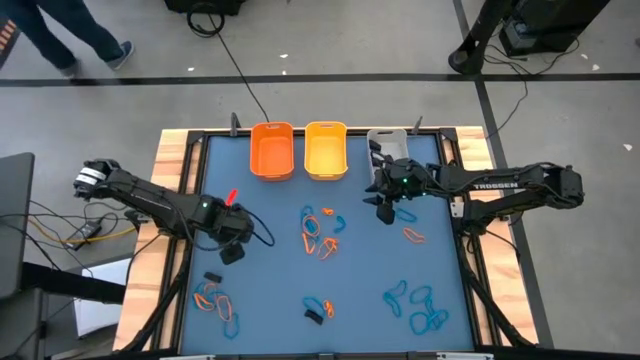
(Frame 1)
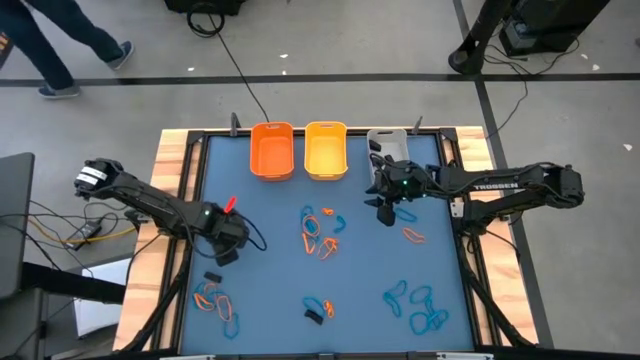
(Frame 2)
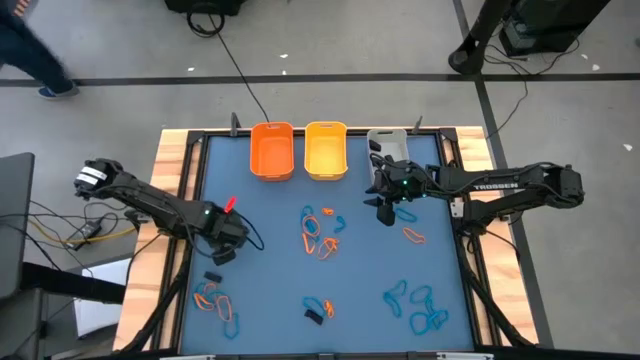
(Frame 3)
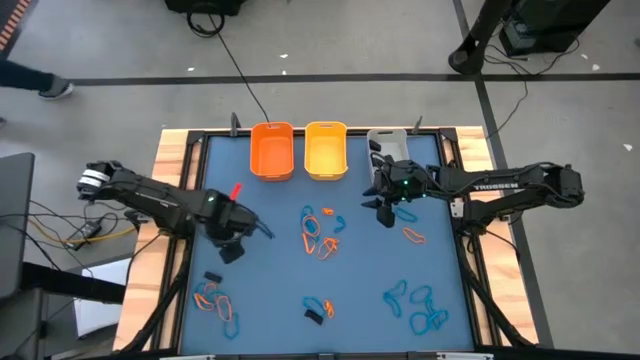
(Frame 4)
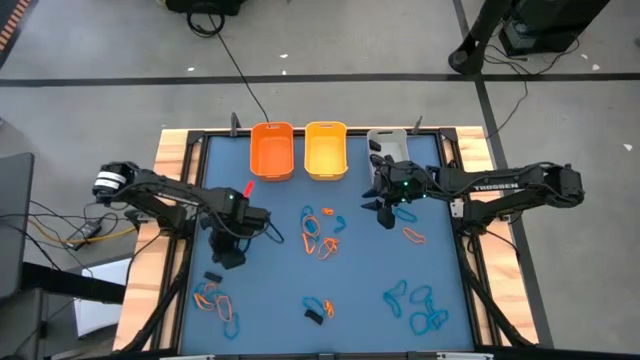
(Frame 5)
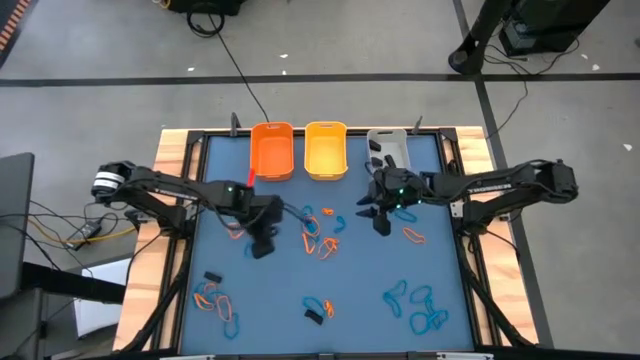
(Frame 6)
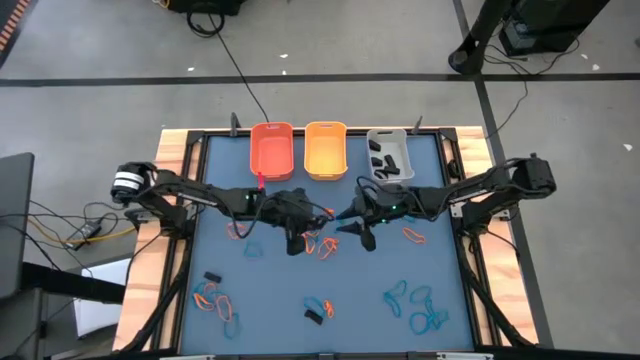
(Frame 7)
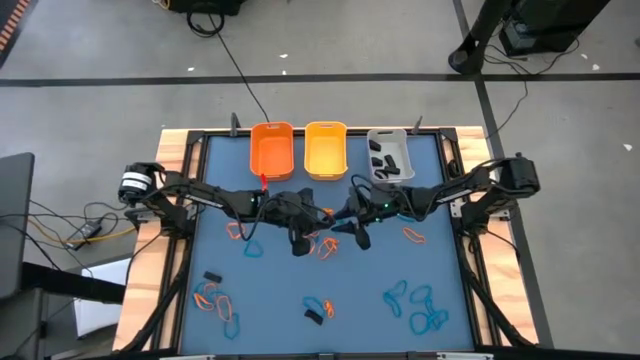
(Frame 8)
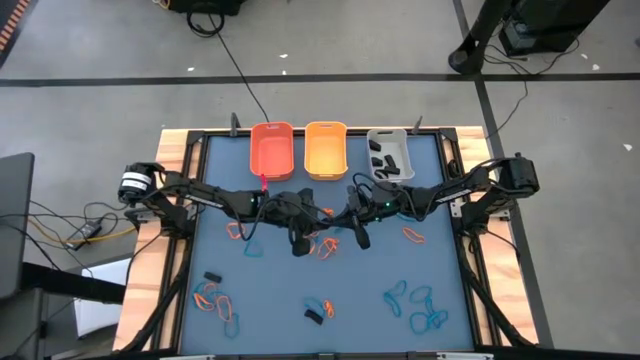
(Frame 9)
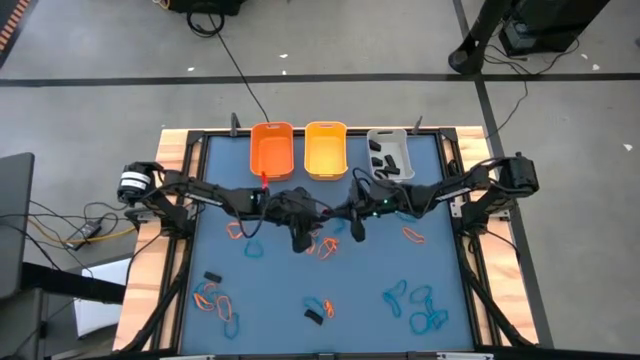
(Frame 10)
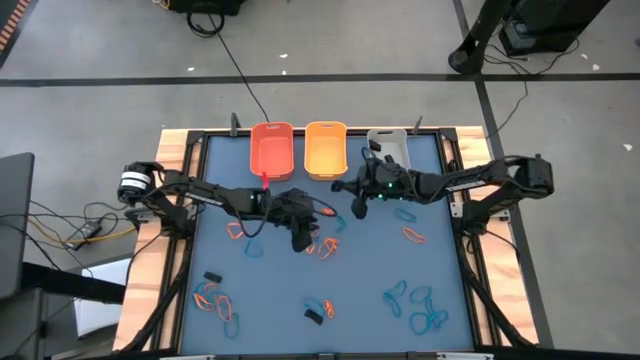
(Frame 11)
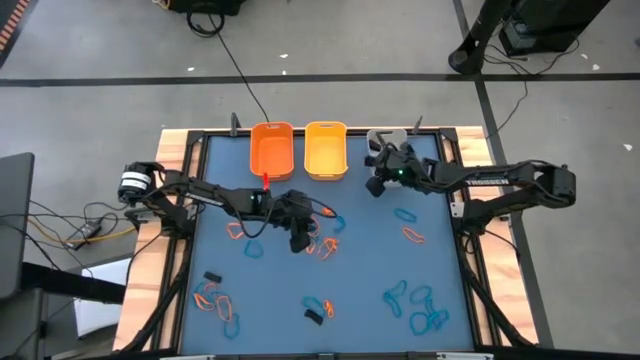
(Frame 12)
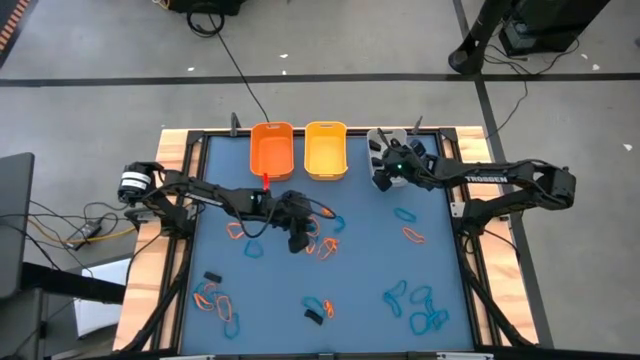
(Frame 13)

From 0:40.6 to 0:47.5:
Task: Sort rubber bands into baskets
Put the black rubber band into the gray bin

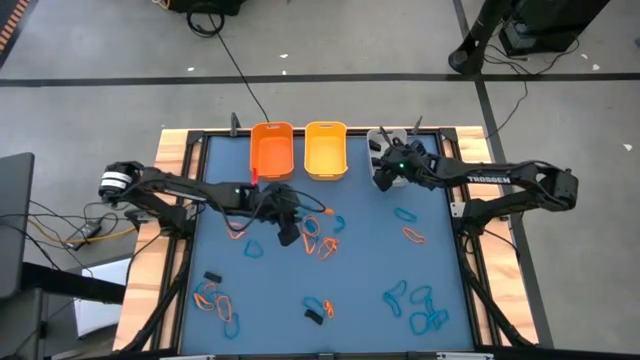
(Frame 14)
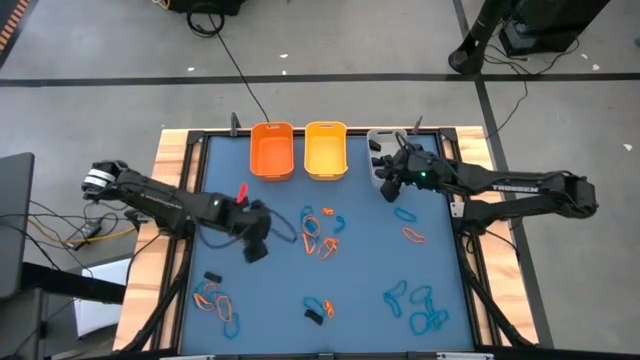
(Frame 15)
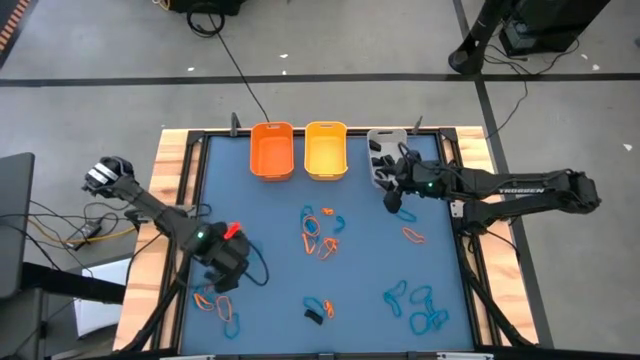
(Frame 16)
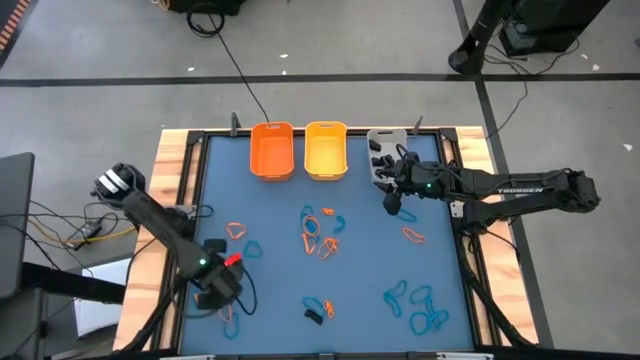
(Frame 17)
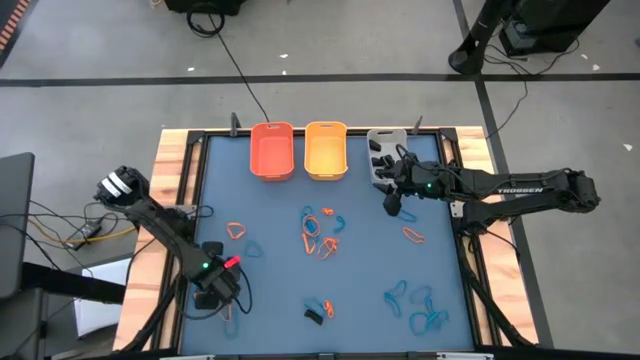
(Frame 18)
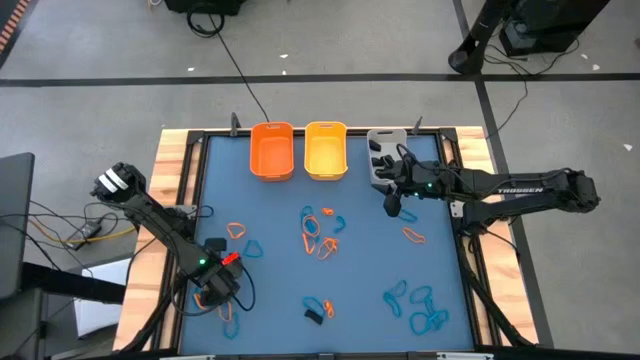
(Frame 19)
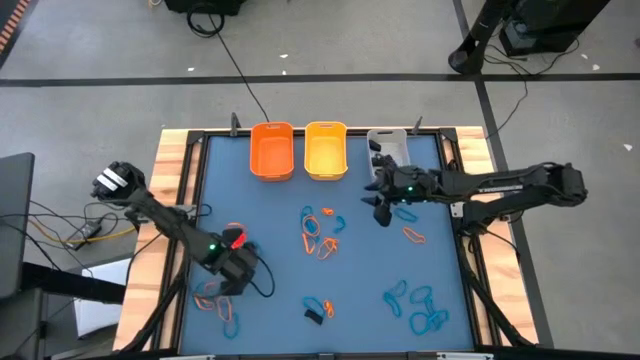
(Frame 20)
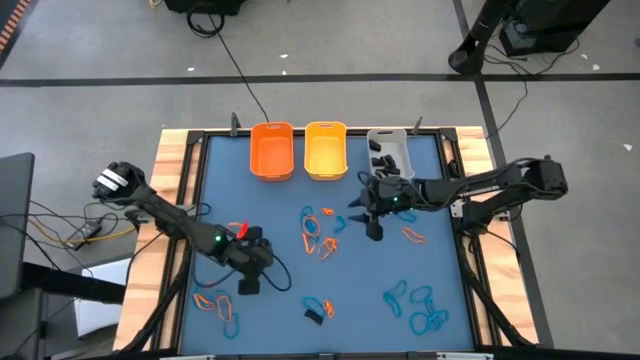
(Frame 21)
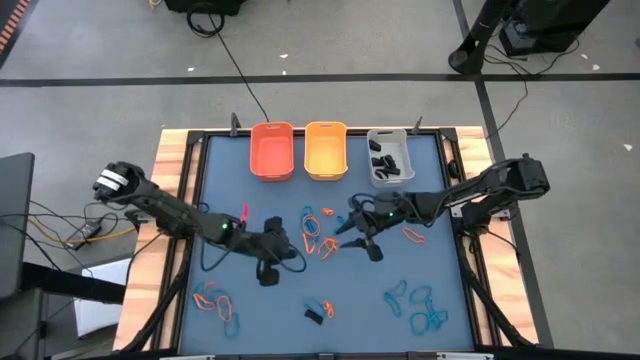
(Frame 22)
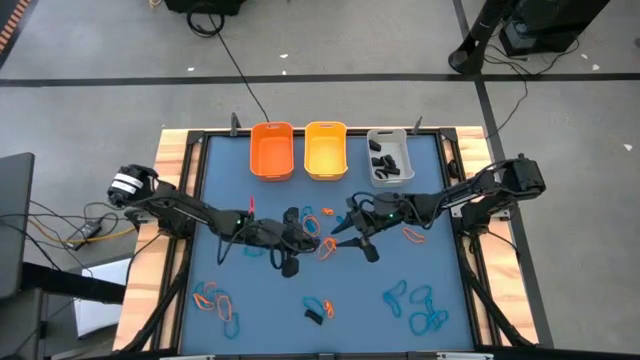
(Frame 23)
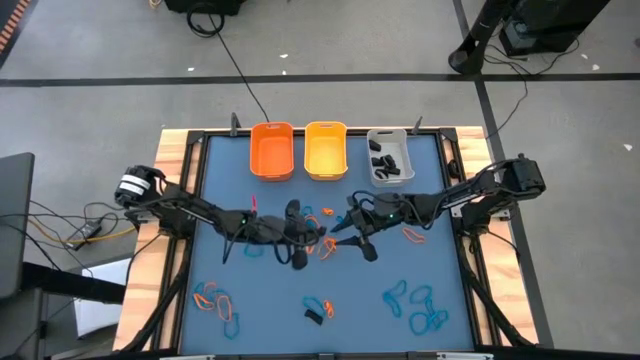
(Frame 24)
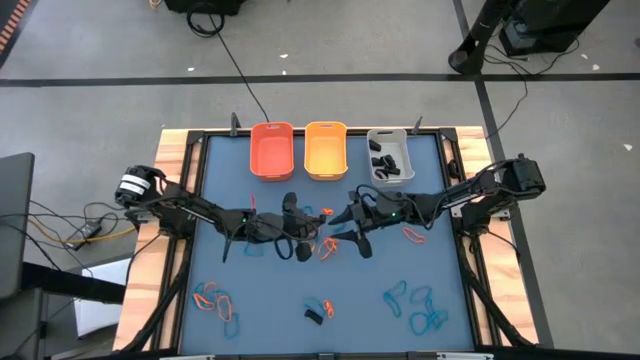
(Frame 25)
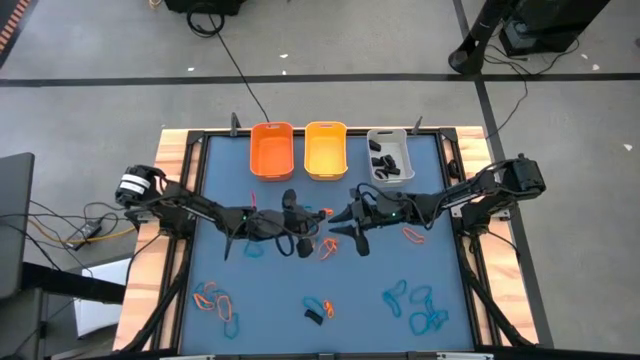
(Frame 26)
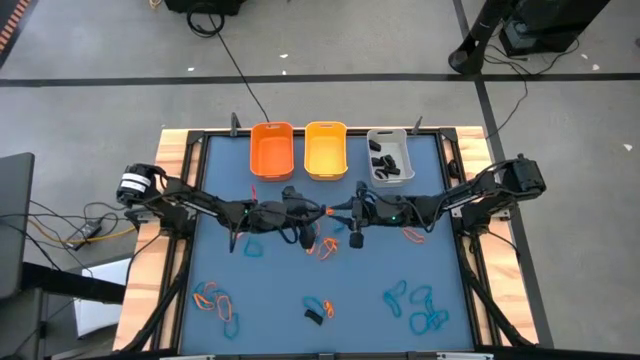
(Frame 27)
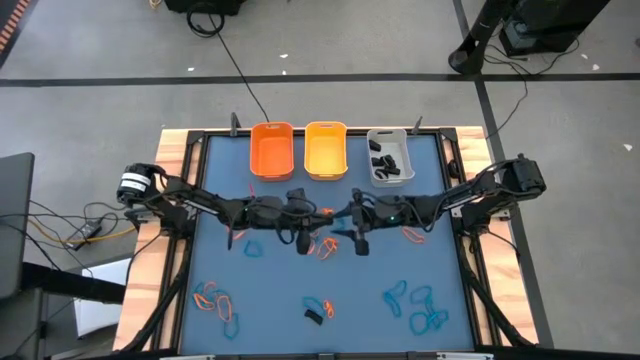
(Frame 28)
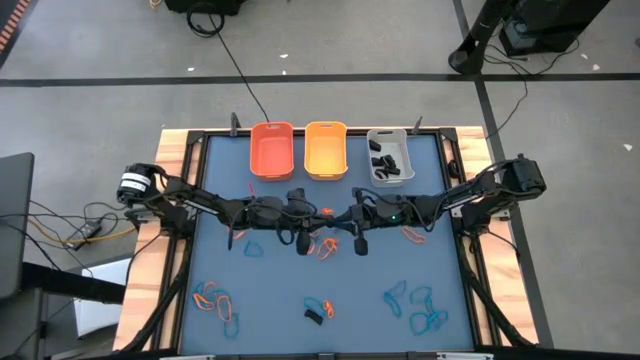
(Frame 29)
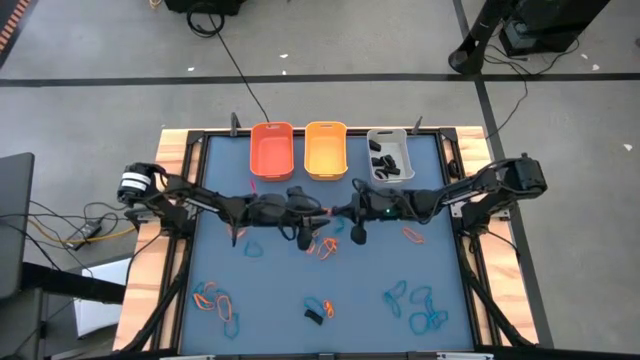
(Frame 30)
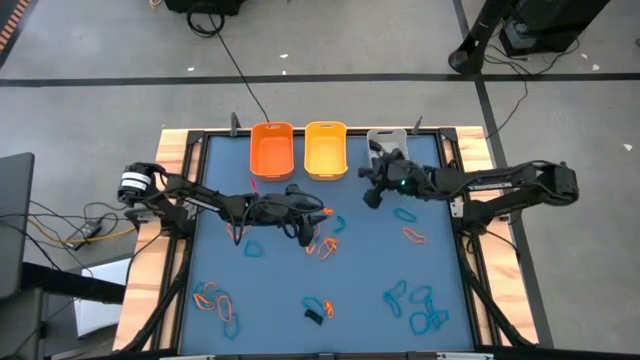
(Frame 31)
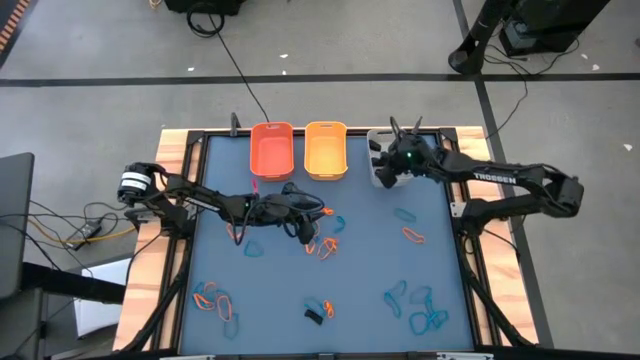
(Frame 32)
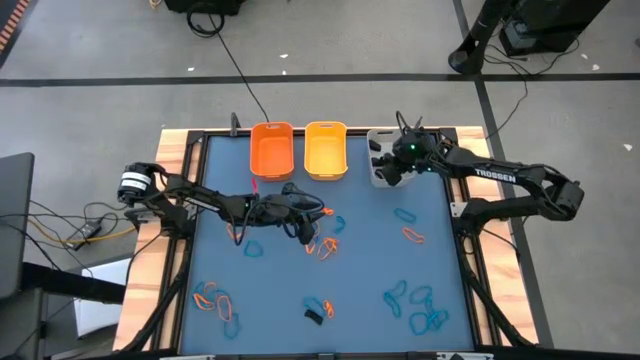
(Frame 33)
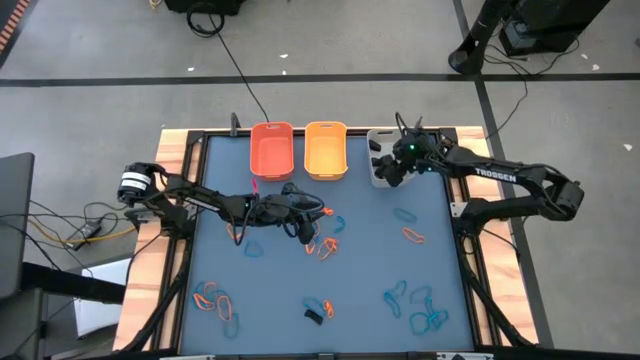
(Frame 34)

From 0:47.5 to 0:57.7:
Put the black rubber band into the gray bin

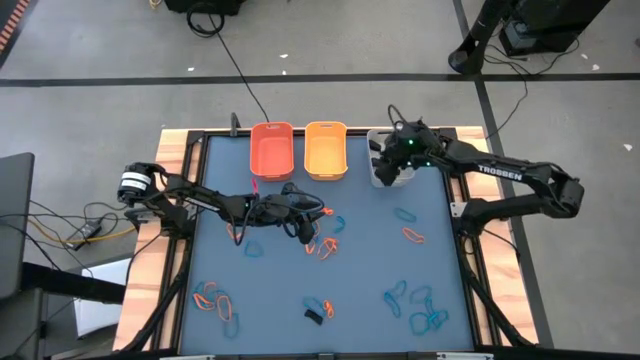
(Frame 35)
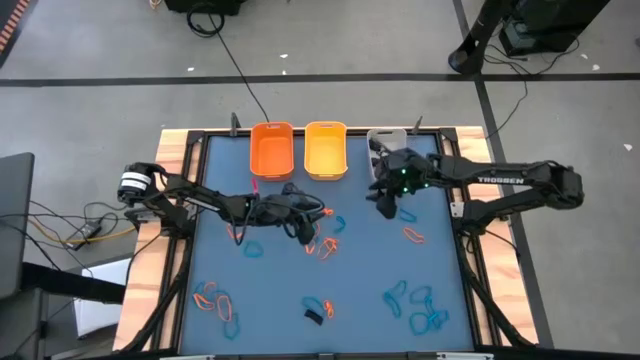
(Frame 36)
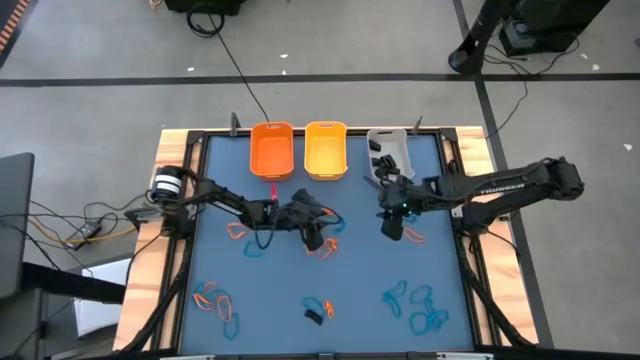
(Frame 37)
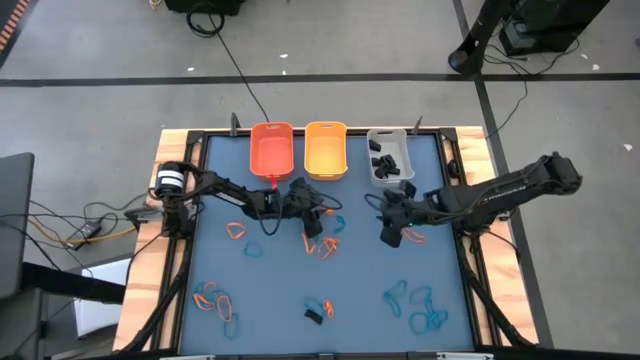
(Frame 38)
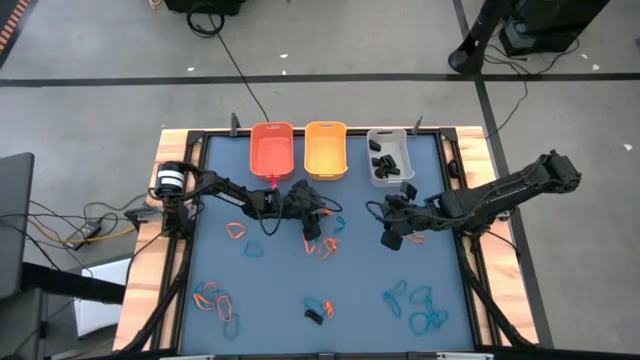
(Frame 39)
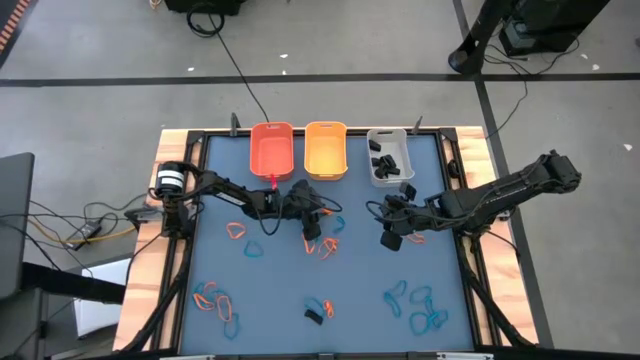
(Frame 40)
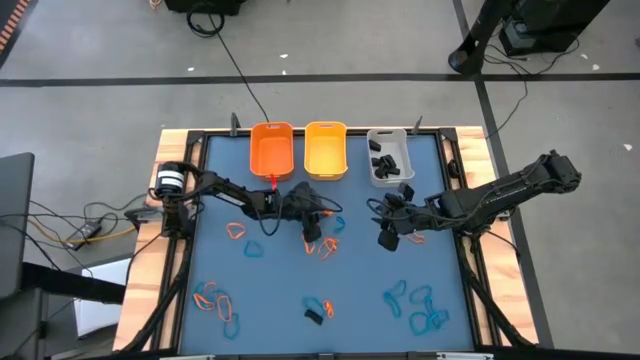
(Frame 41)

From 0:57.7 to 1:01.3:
Put the orange rubber band into the yellow bin

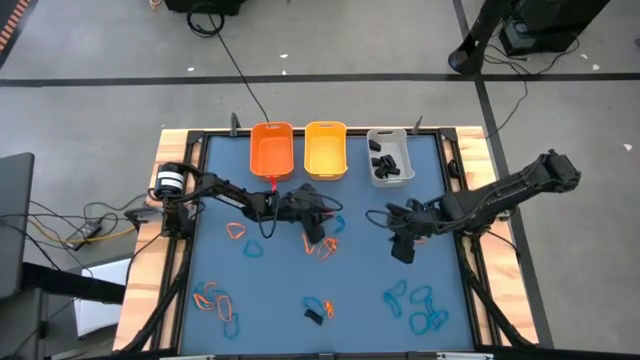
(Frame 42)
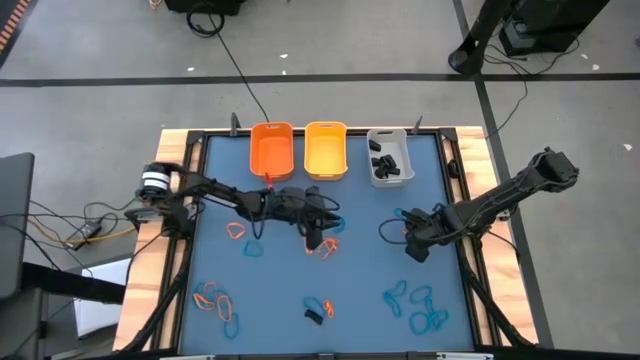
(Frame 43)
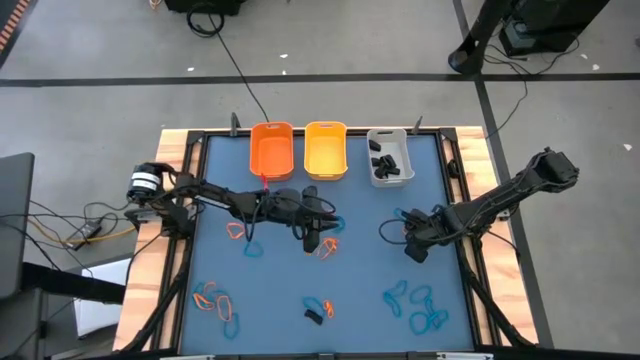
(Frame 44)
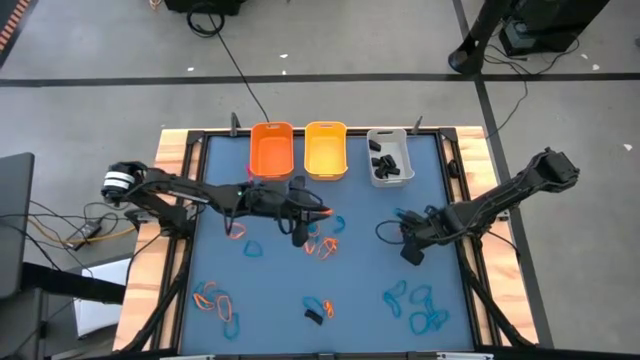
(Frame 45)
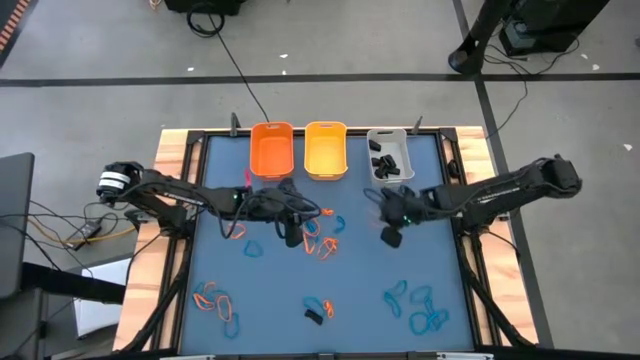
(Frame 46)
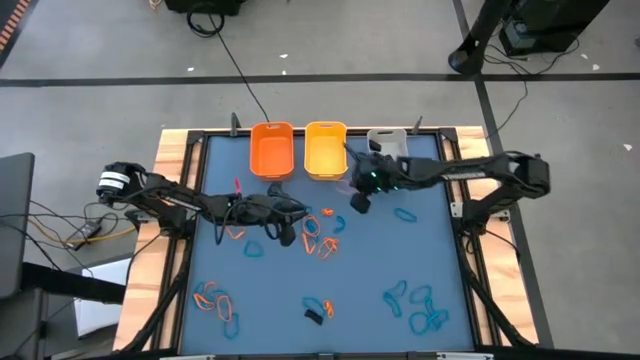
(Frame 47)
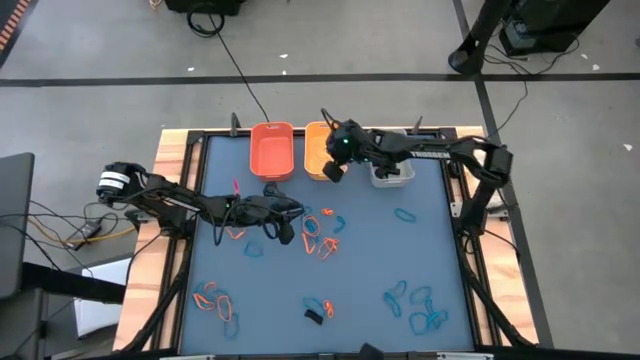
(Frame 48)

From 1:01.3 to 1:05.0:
Put the orange rubber band into the yellow bin
